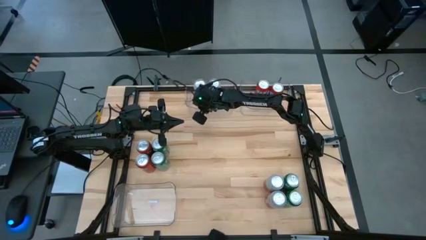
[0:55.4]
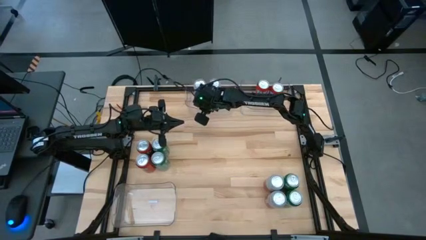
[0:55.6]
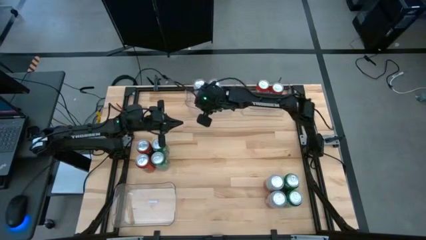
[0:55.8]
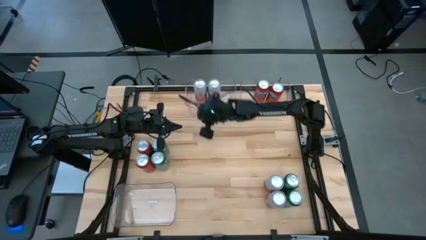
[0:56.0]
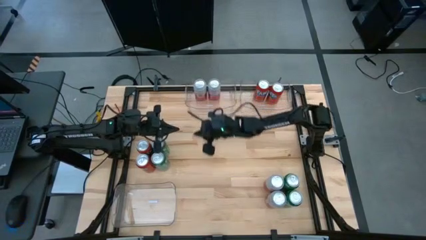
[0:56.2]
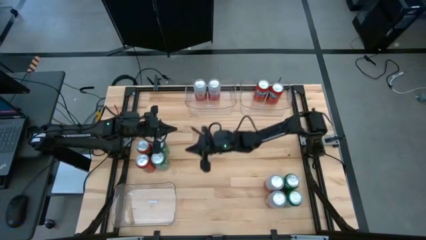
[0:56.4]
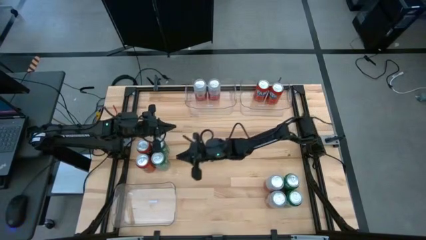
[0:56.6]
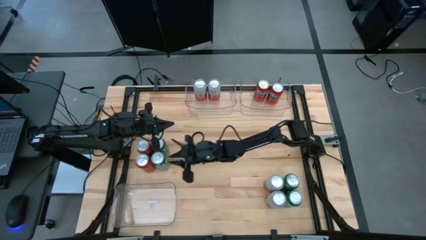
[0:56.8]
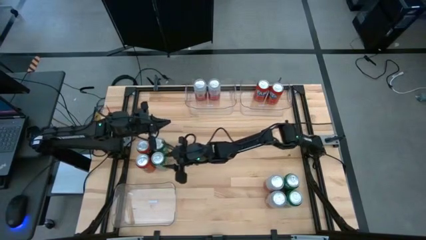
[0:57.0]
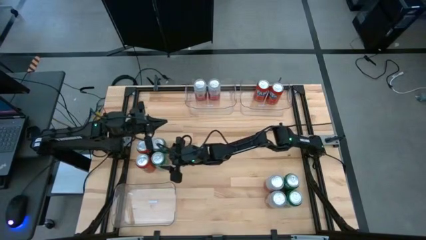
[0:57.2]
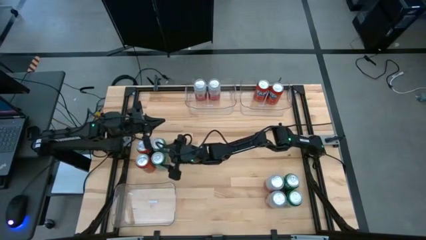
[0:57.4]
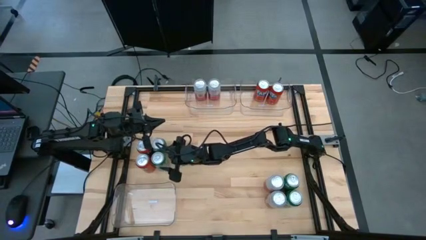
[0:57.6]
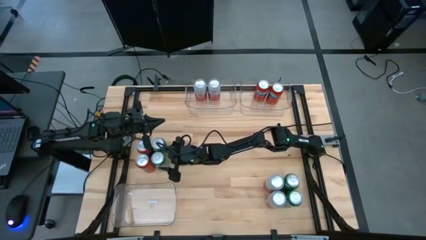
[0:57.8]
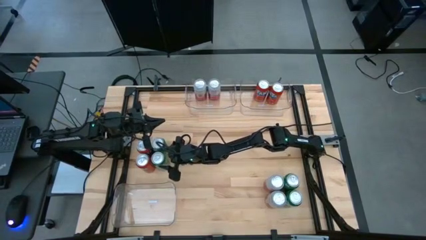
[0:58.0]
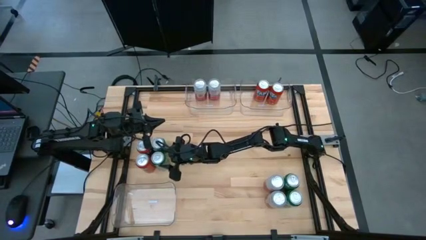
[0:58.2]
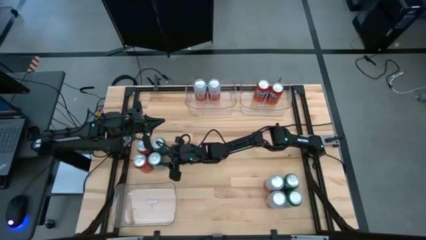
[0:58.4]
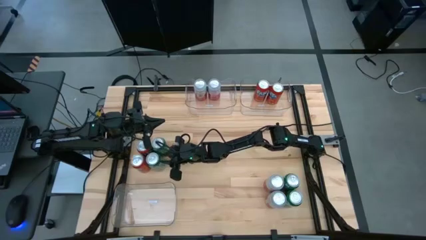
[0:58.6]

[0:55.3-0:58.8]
Task: Sort soda cans
Put the green soda can into the bottom left transparent bin

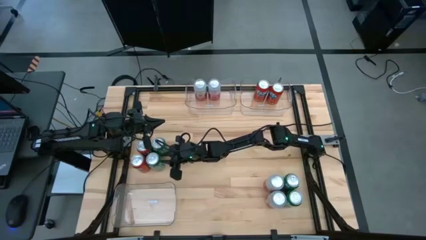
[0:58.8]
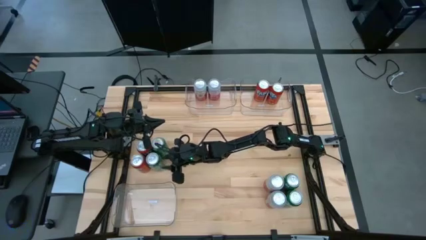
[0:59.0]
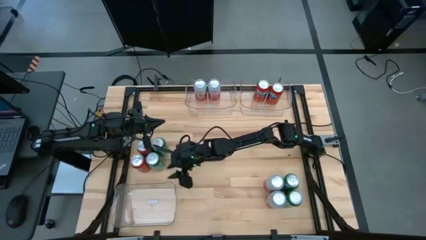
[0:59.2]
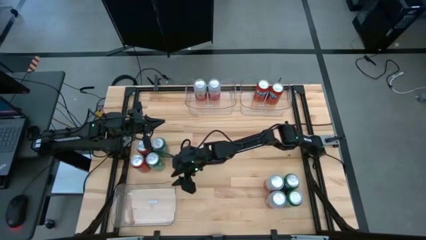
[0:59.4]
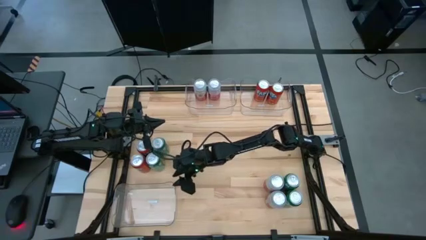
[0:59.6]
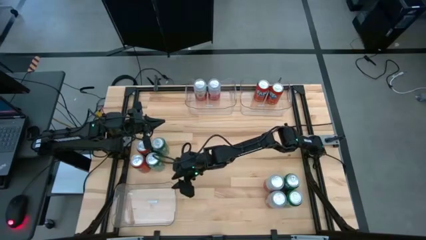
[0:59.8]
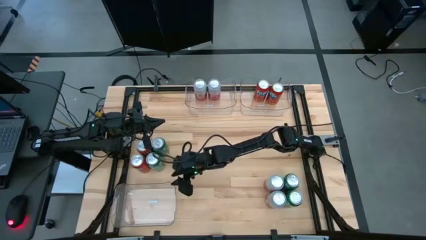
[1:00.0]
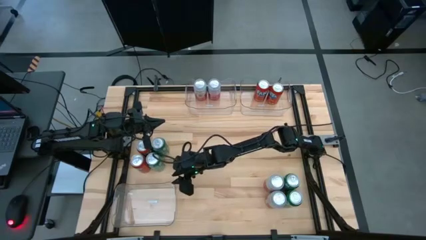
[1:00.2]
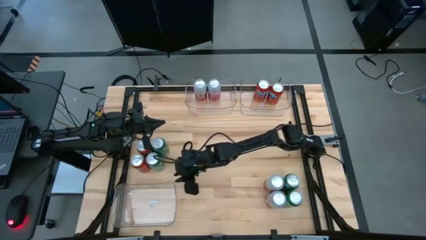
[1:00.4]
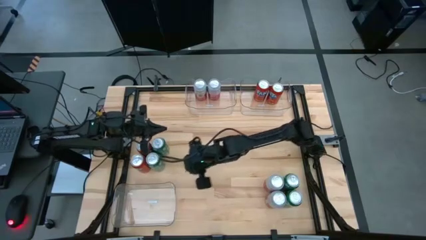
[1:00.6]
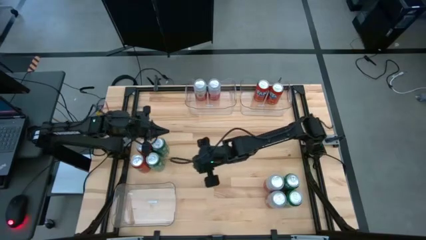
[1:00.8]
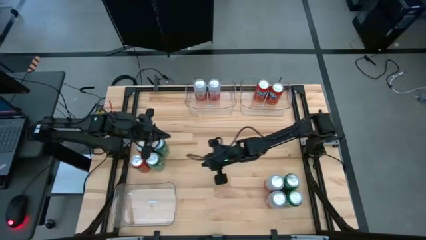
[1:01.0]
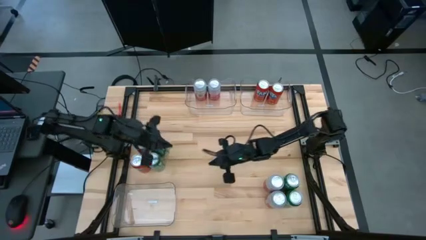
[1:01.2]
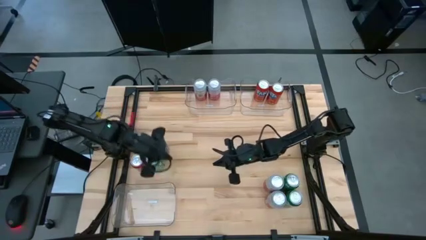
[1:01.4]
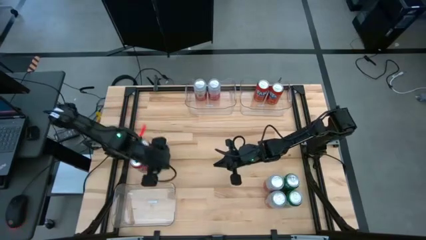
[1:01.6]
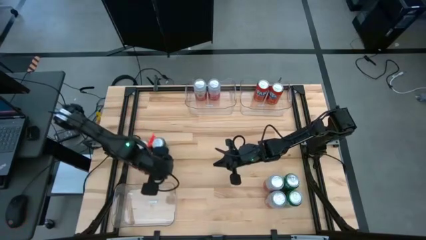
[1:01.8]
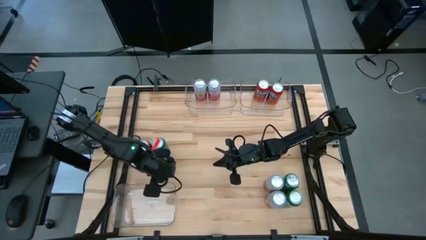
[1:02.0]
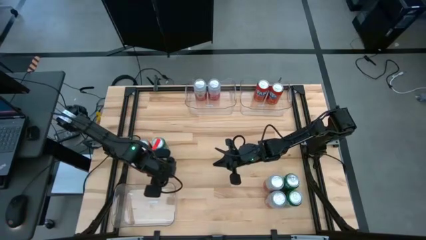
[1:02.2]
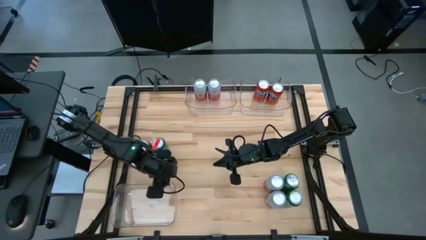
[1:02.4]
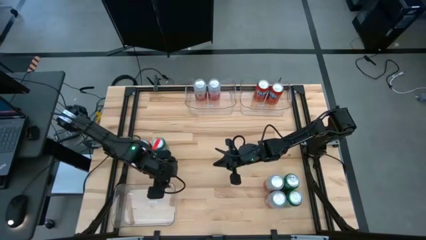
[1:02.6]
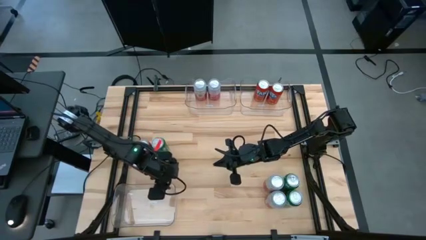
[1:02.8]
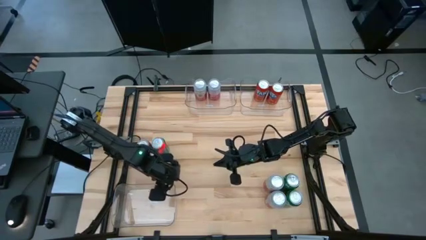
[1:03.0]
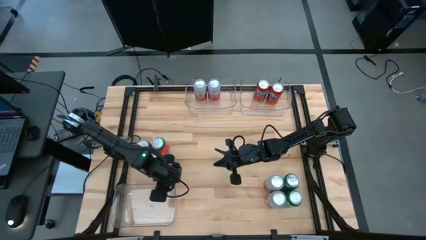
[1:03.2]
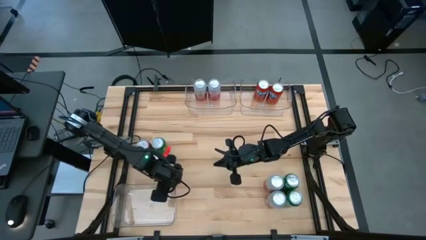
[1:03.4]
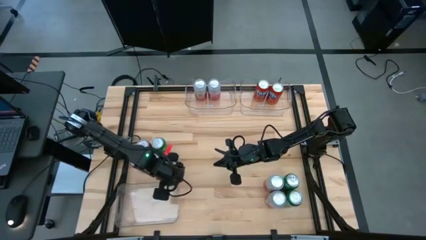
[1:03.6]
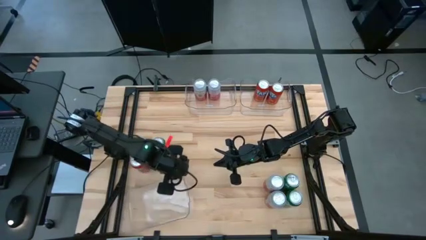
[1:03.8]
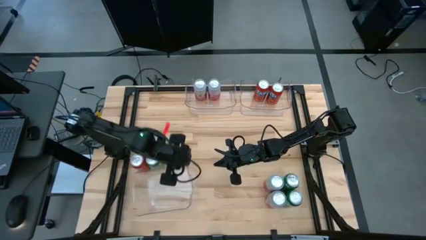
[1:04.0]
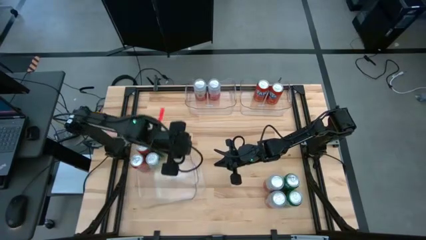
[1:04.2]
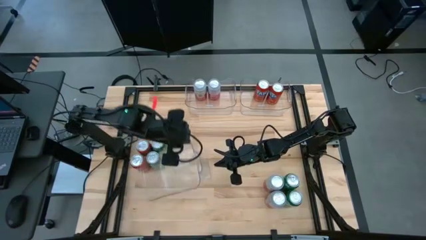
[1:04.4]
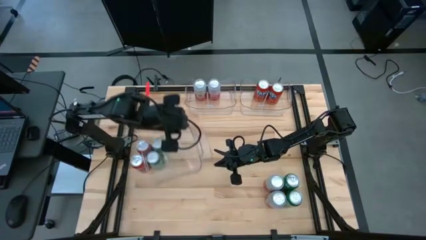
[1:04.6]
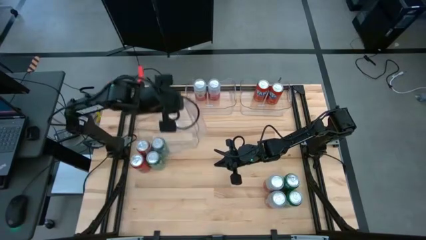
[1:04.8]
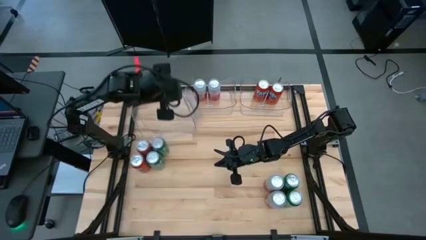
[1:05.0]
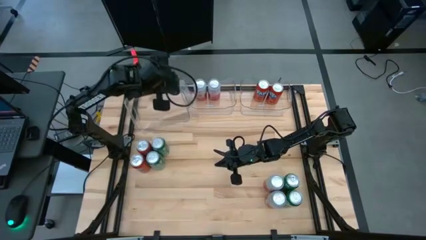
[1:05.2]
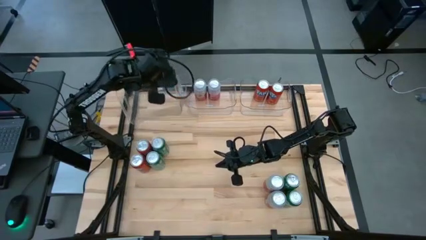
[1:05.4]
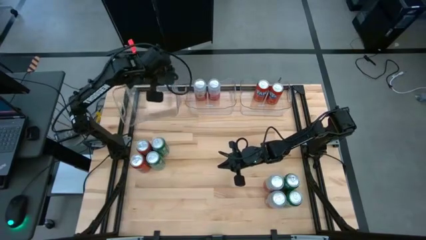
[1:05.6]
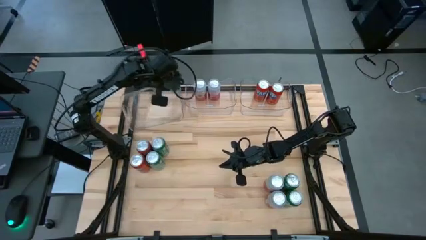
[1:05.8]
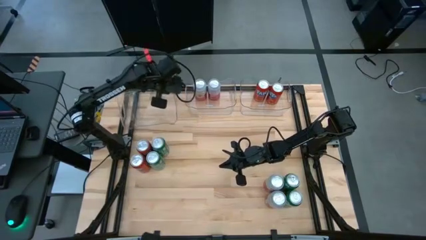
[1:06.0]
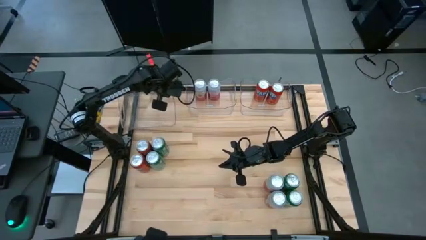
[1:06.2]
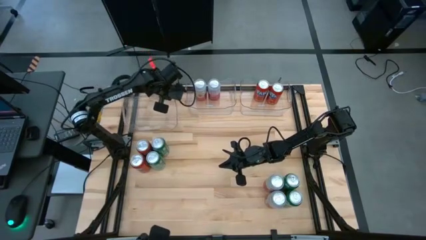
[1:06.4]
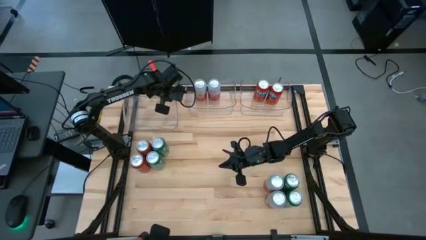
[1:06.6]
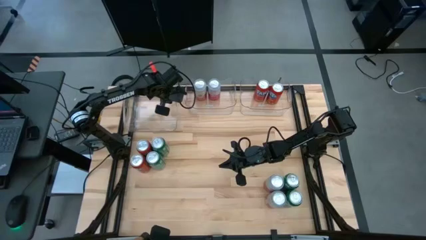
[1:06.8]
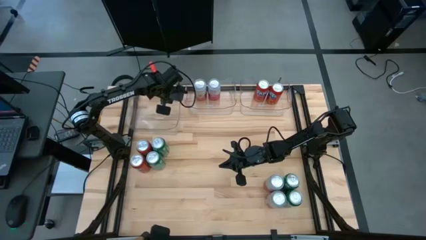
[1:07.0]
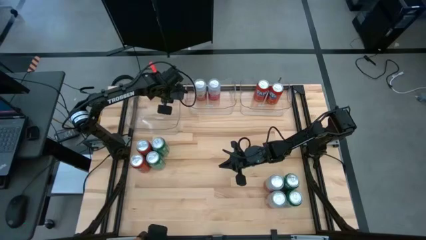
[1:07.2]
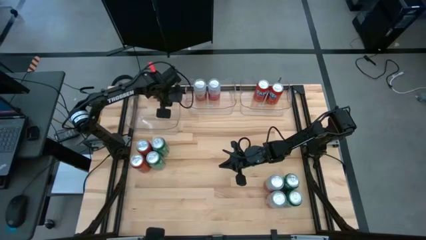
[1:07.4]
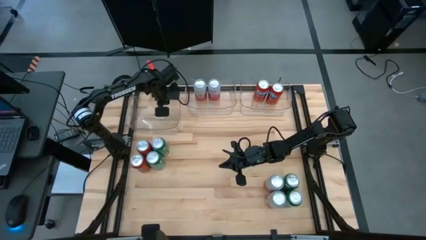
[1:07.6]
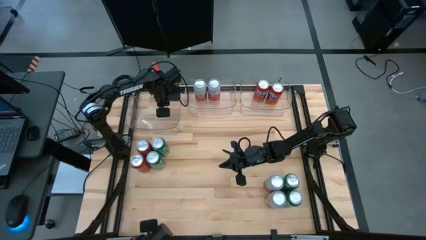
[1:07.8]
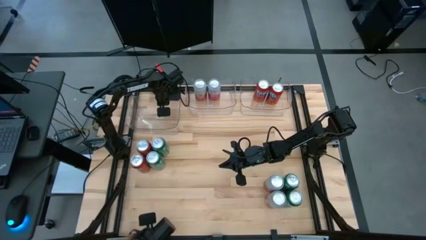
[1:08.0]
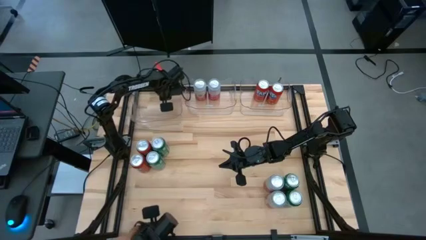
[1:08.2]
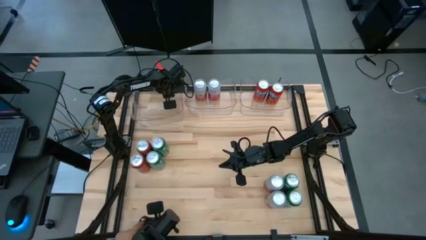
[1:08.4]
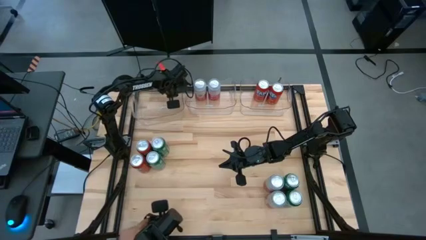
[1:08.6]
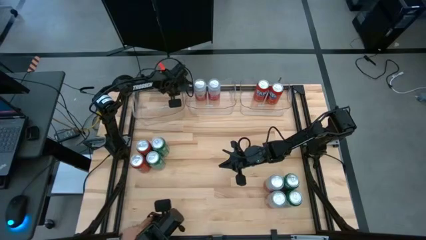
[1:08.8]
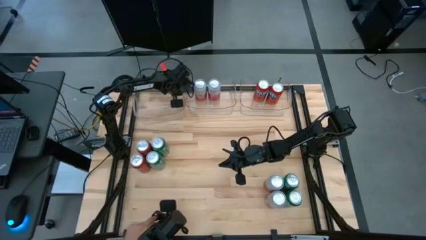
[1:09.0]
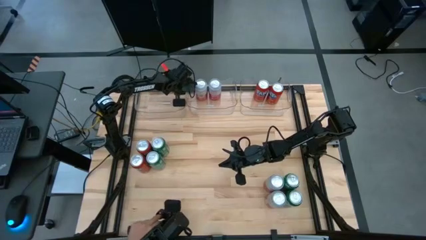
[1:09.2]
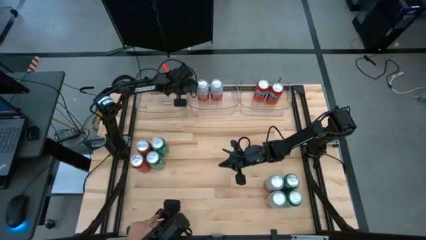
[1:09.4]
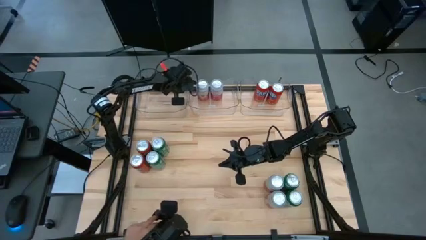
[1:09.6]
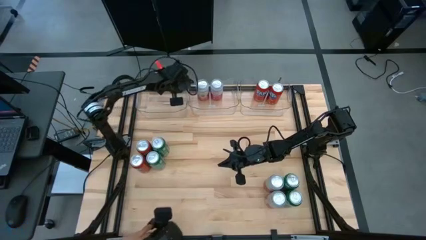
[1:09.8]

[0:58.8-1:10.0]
Put the bottom left transparent bin to the top left of the table
